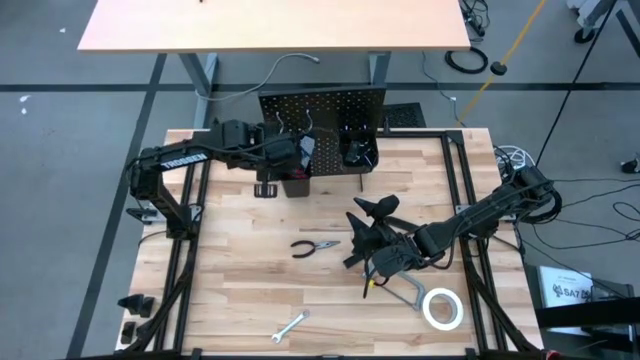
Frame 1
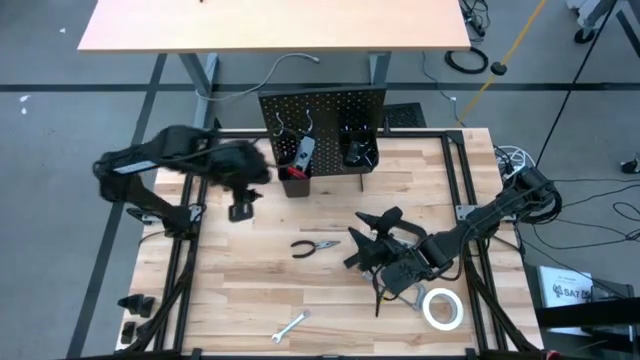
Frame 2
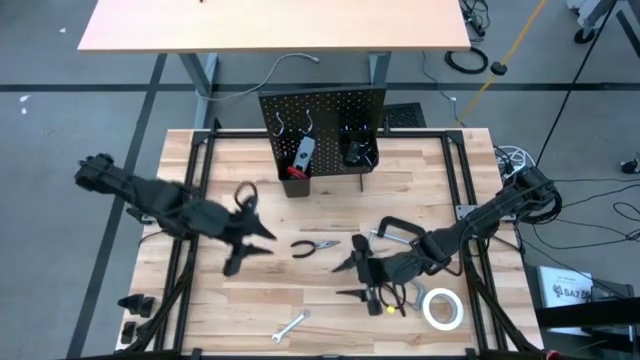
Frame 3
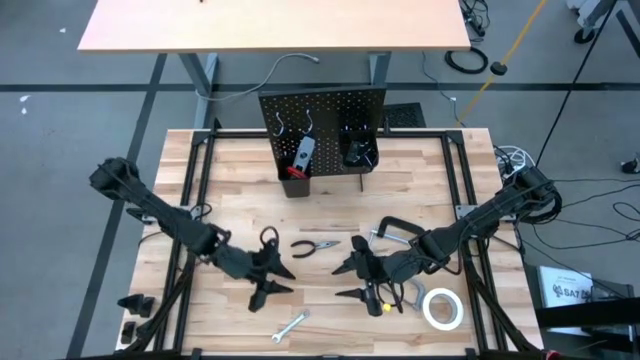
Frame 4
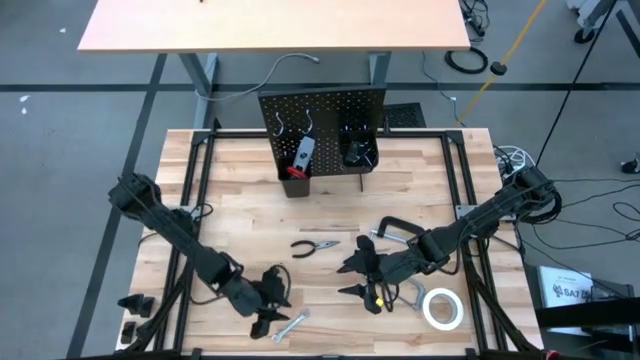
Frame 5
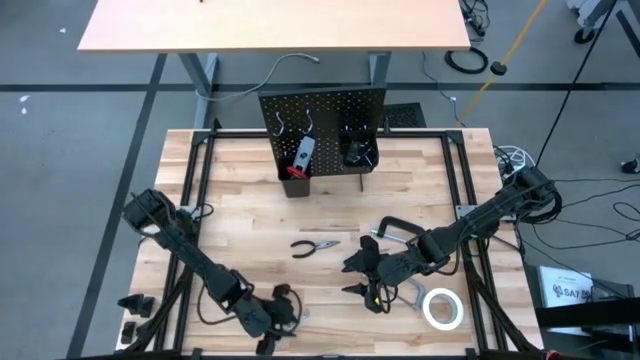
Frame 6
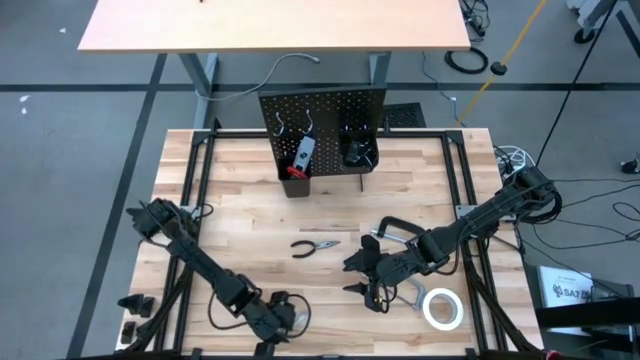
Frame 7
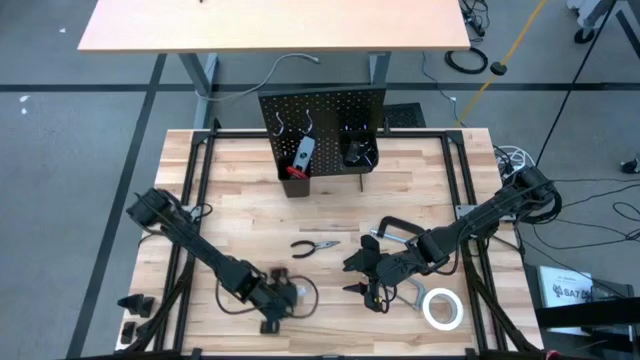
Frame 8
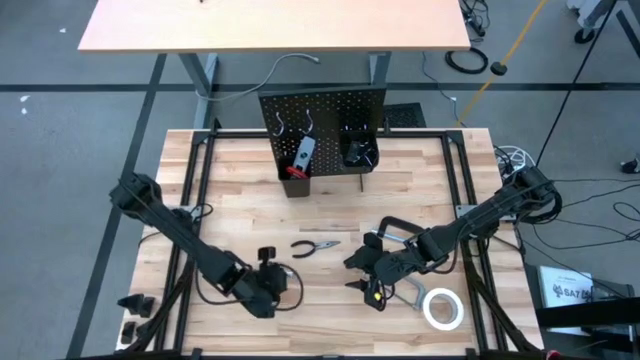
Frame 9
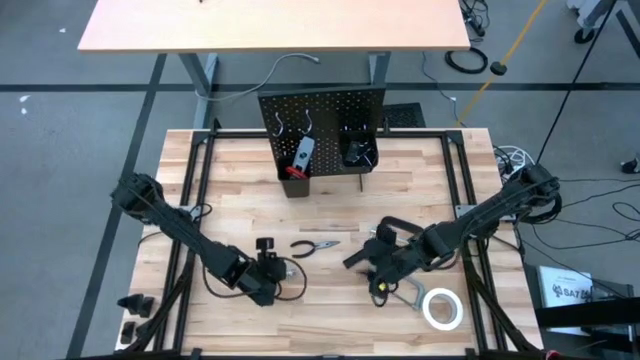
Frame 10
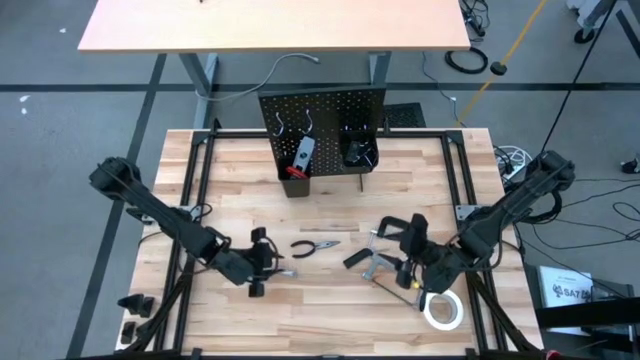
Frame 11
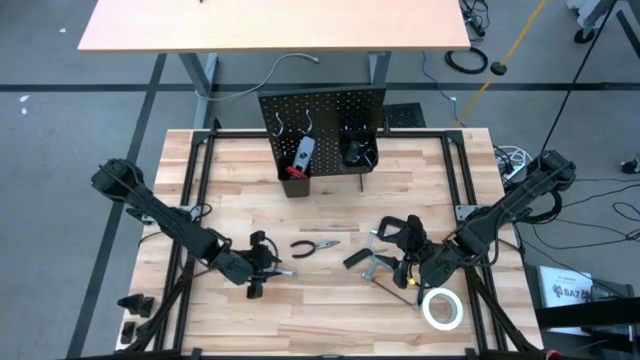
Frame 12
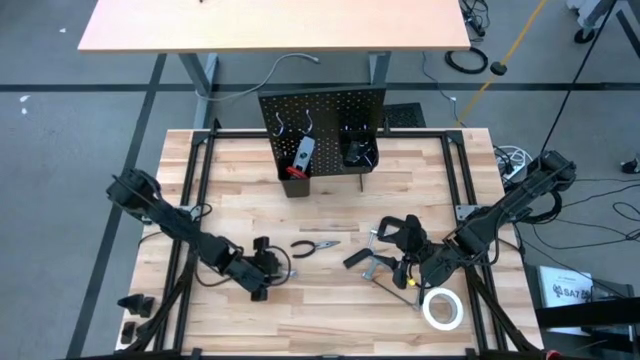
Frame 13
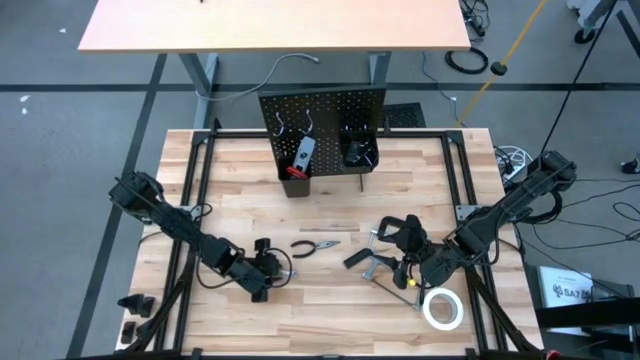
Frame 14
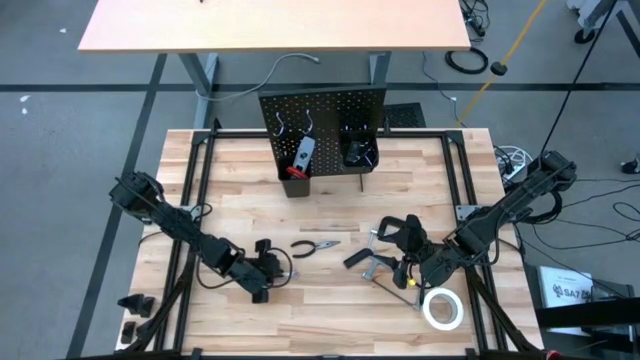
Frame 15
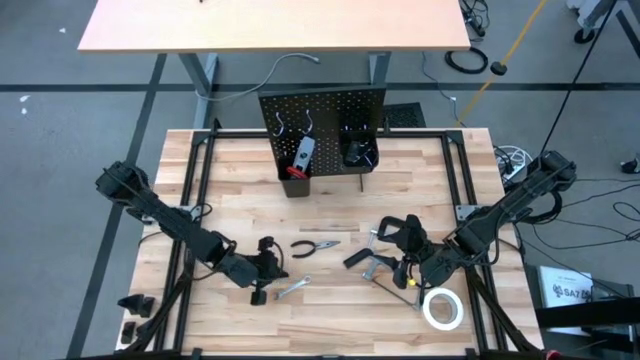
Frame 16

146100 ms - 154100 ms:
Task: Hang tools onto peg board
Put the wrench into the left black bin on the pegboard

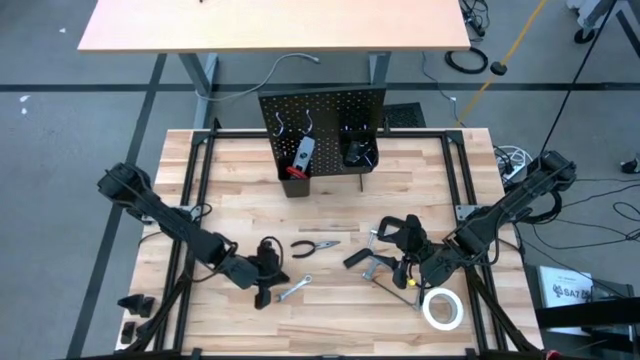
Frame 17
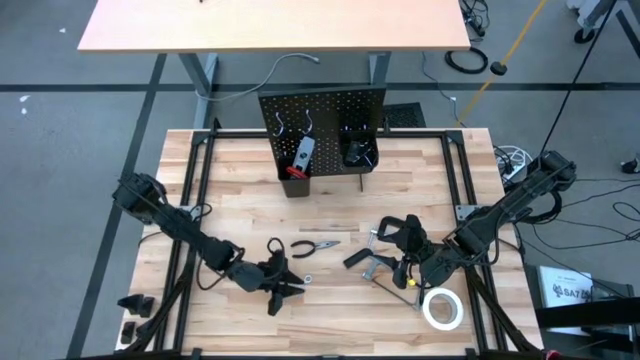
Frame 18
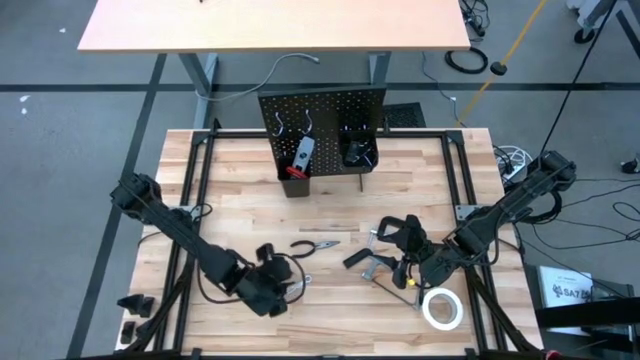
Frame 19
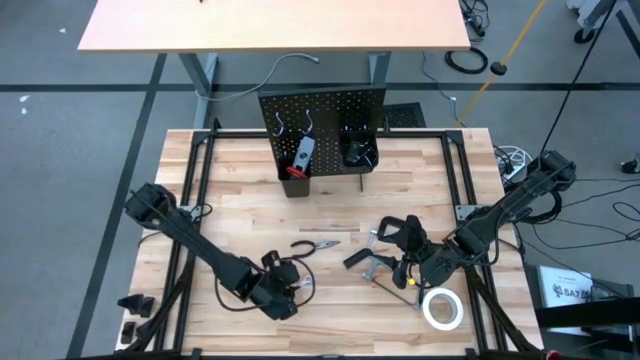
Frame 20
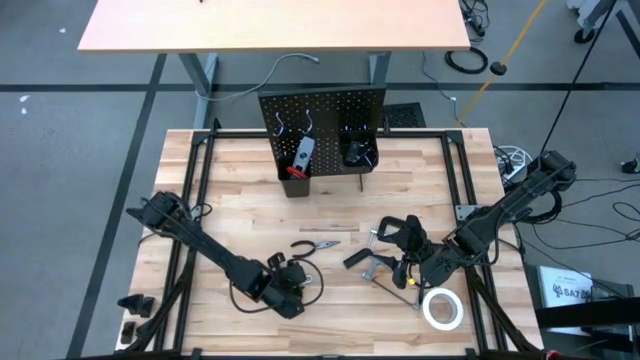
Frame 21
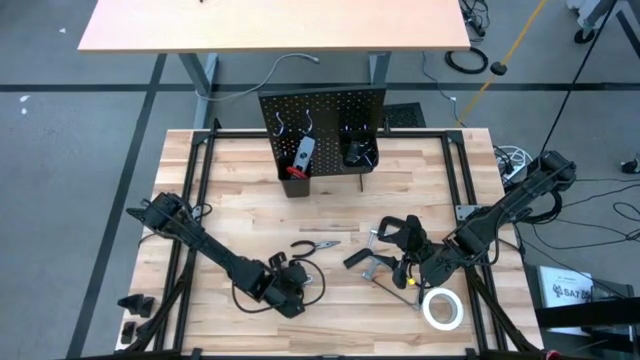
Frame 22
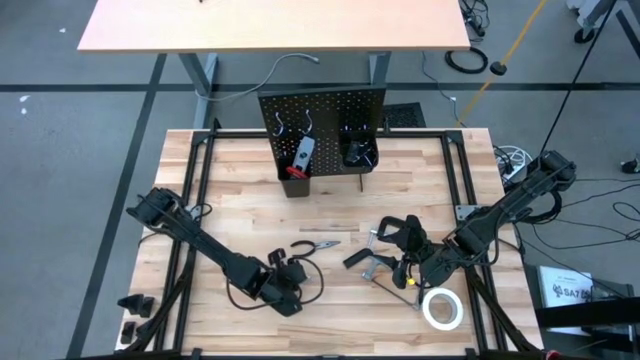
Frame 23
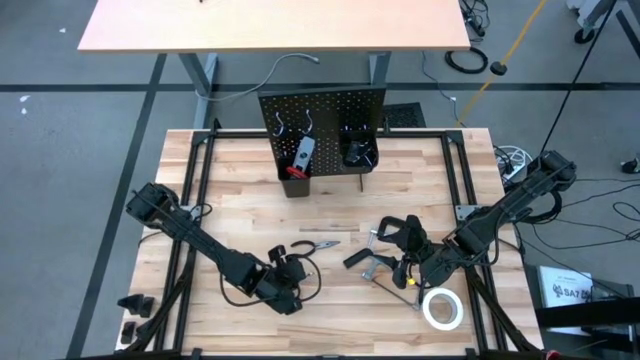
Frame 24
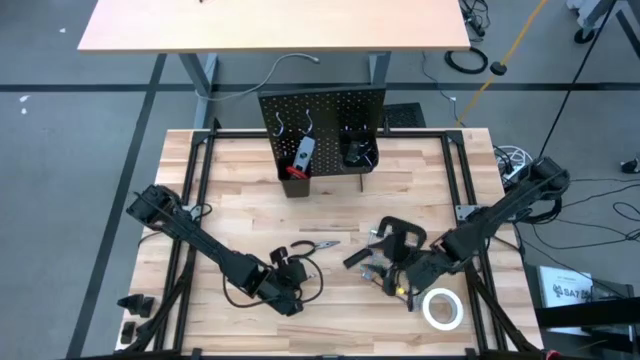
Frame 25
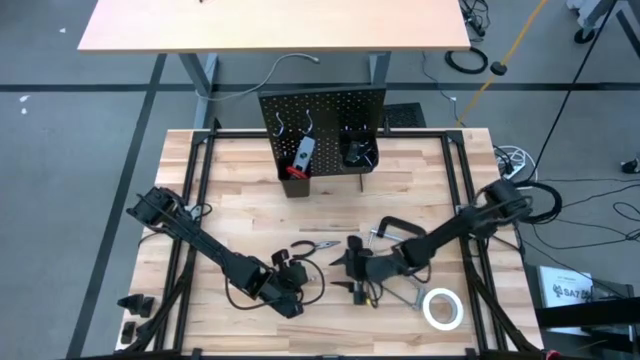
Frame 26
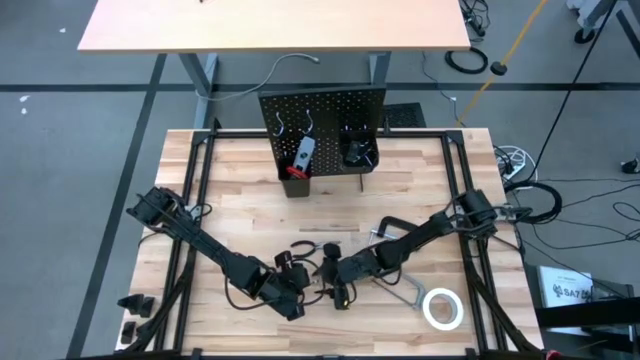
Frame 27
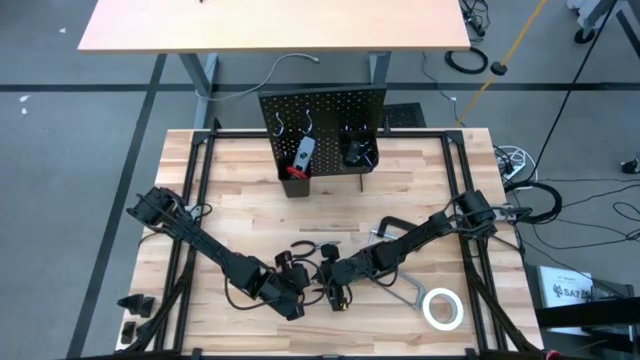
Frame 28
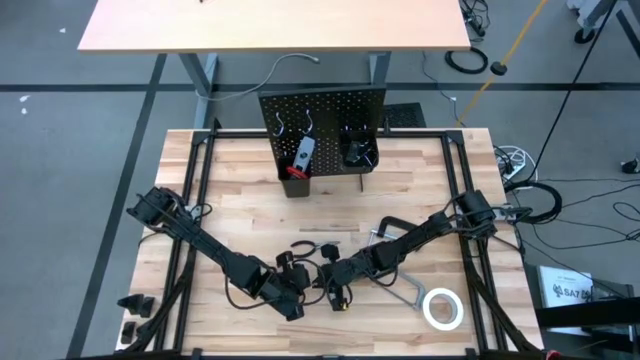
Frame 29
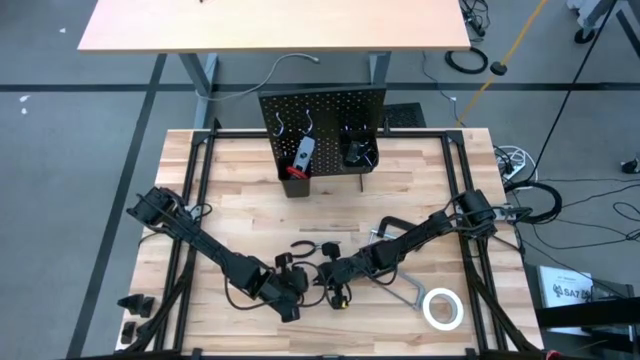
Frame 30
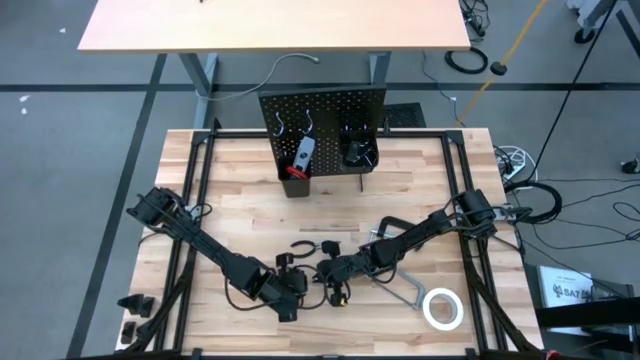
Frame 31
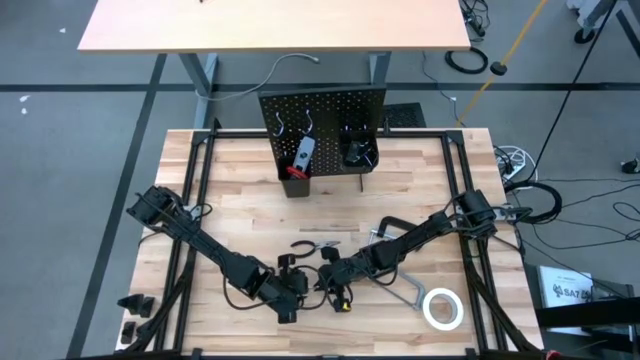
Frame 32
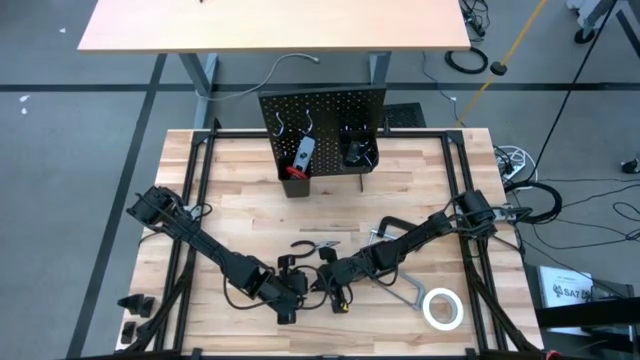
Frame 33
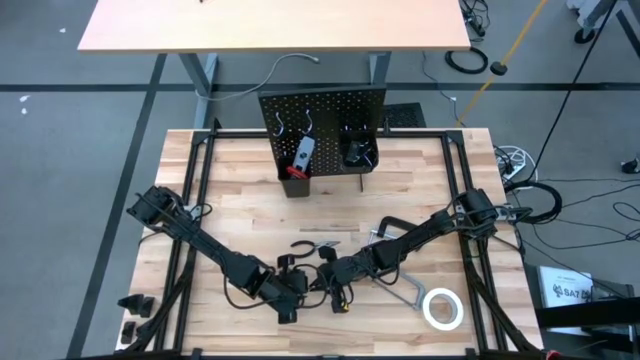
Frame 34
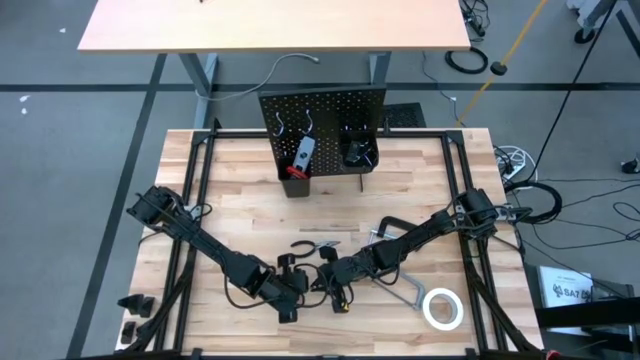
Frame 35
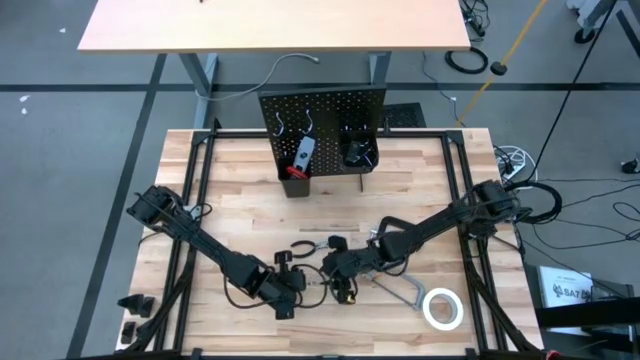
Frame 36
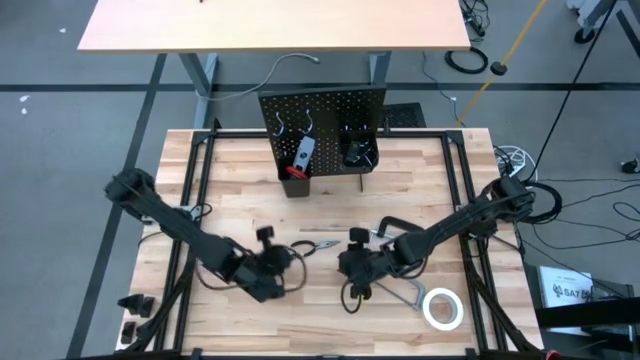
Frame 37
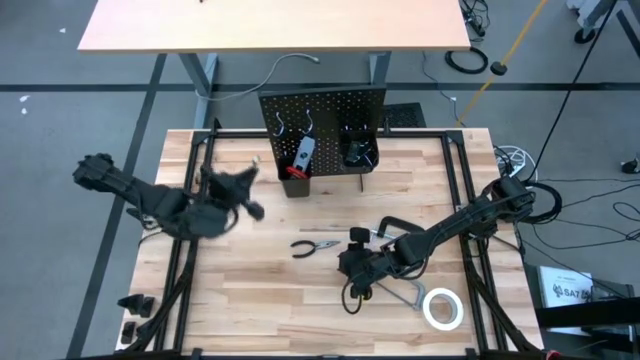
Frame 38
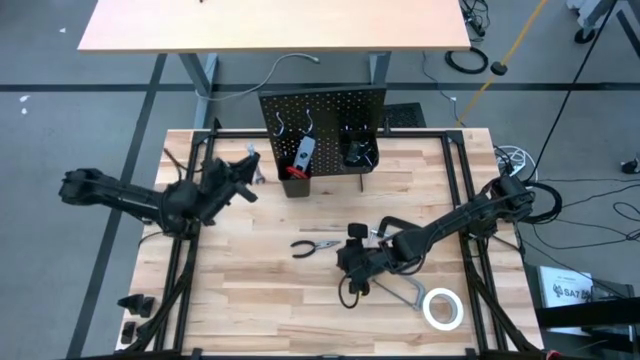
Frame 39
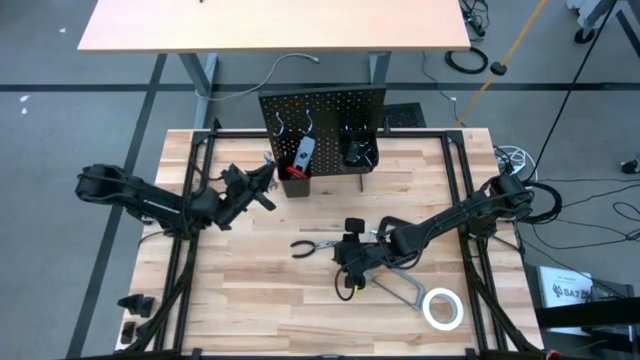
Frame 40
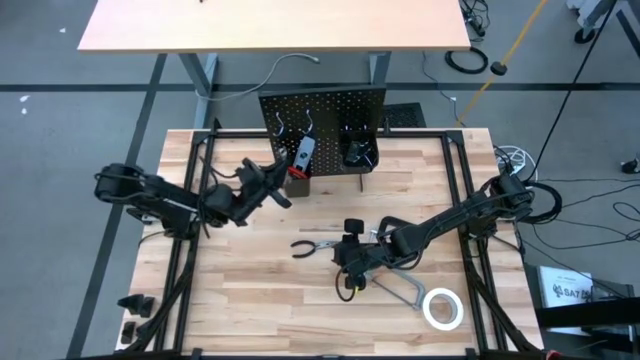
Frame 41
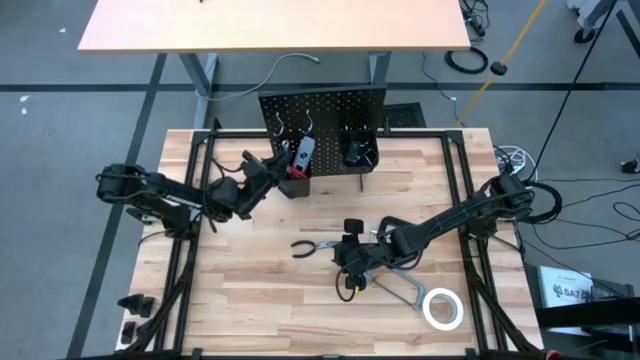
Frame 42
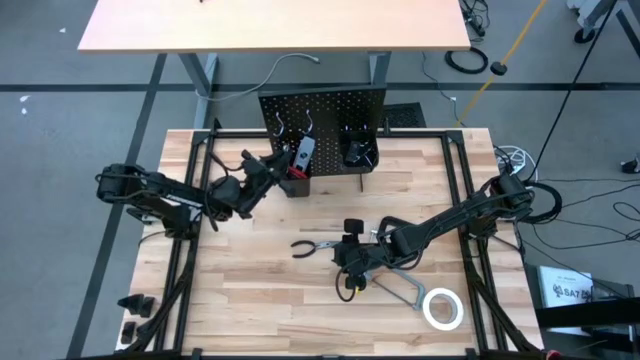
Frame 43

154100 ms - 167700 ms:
Put the wrench into the left black bin on the pegboard
